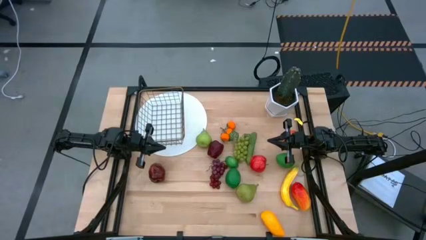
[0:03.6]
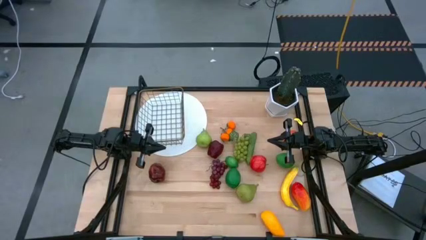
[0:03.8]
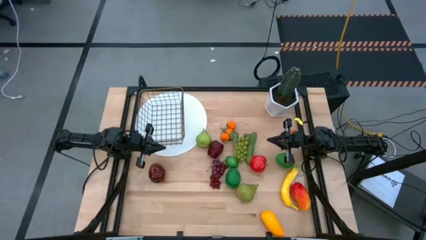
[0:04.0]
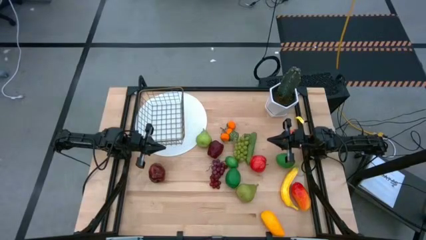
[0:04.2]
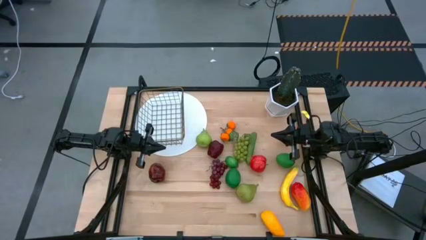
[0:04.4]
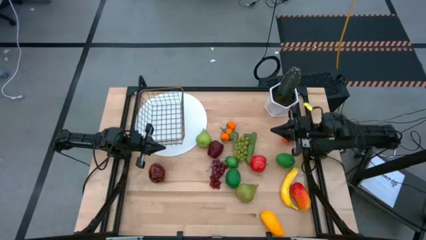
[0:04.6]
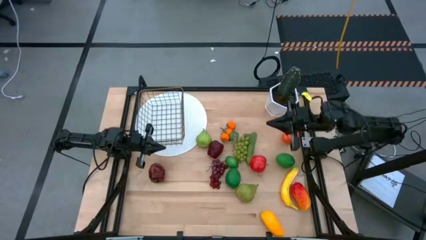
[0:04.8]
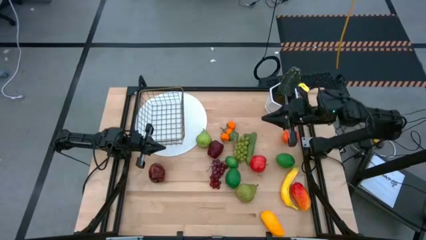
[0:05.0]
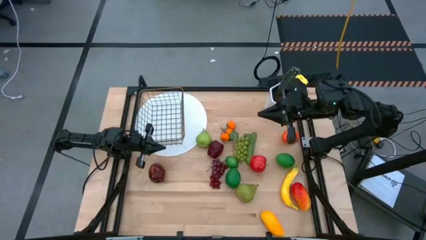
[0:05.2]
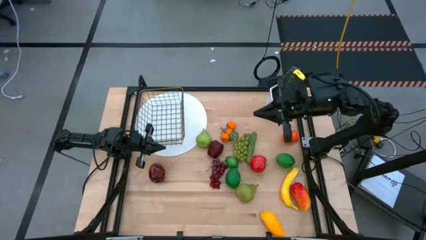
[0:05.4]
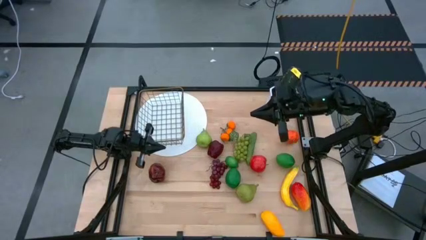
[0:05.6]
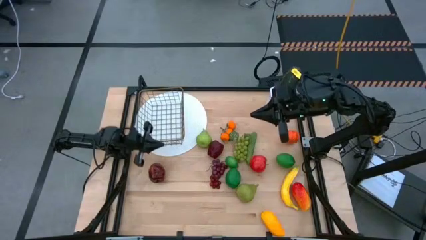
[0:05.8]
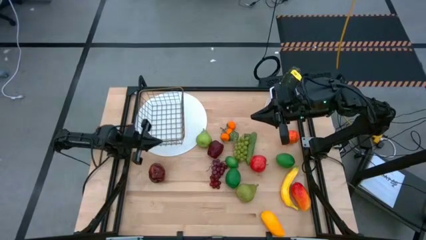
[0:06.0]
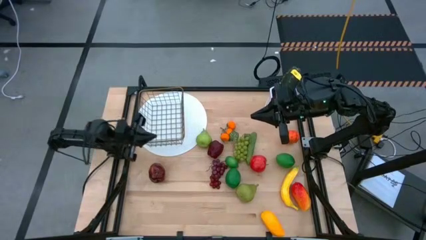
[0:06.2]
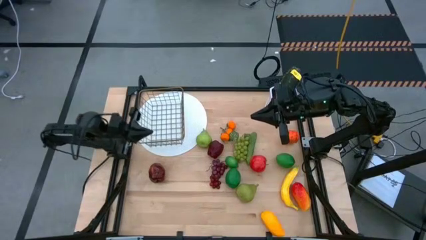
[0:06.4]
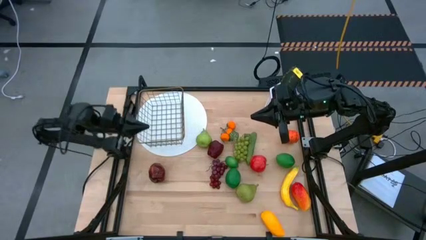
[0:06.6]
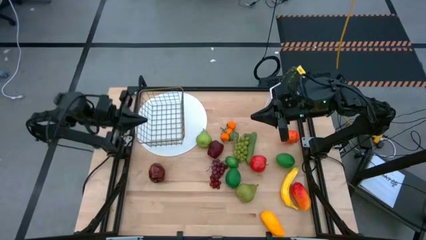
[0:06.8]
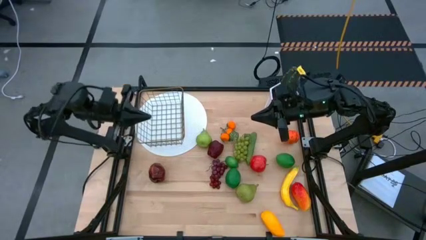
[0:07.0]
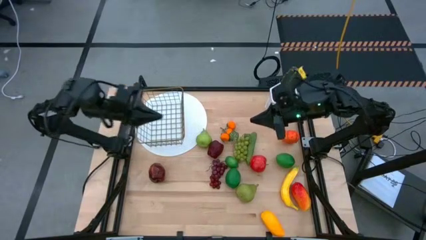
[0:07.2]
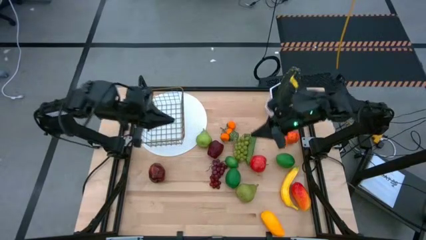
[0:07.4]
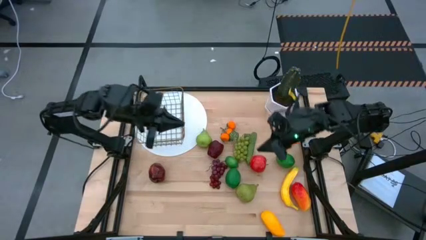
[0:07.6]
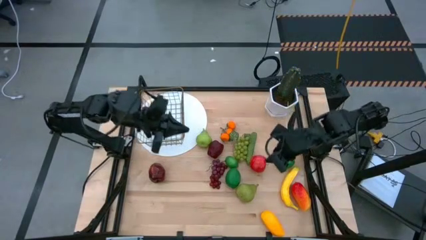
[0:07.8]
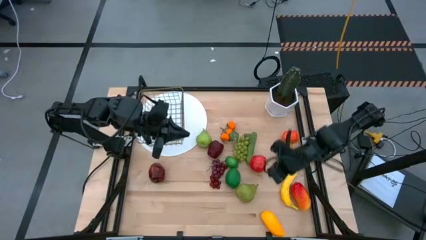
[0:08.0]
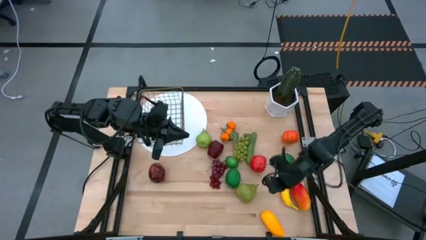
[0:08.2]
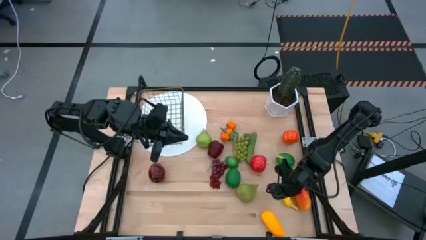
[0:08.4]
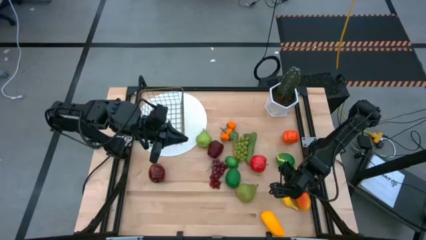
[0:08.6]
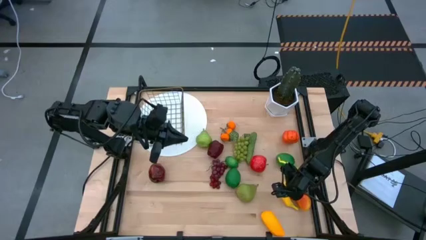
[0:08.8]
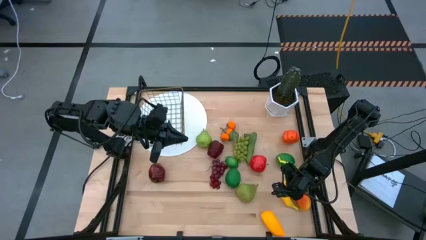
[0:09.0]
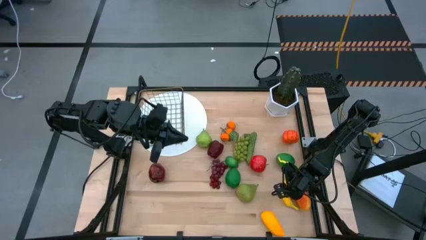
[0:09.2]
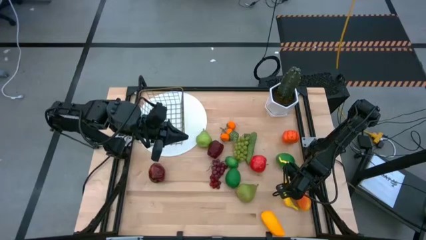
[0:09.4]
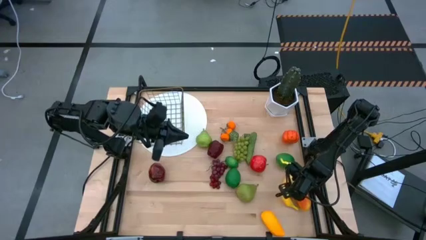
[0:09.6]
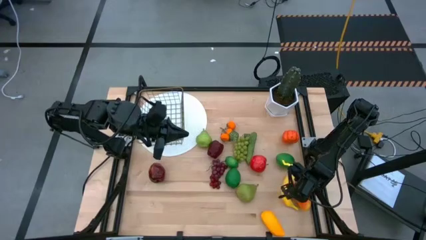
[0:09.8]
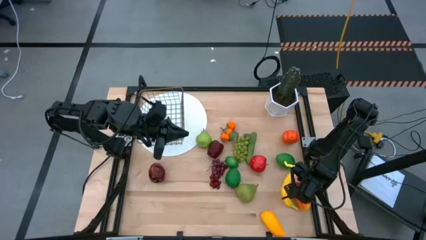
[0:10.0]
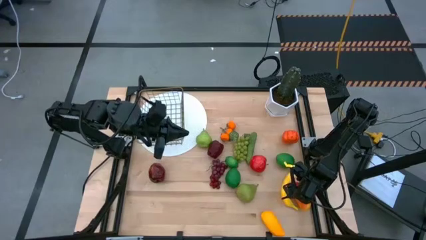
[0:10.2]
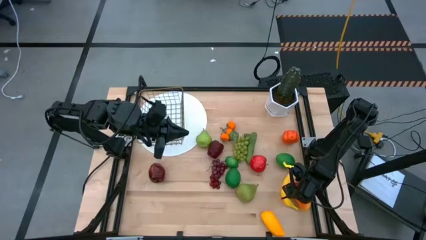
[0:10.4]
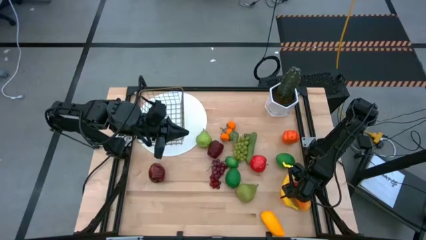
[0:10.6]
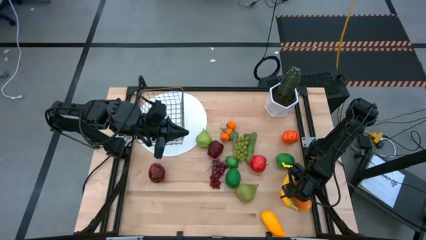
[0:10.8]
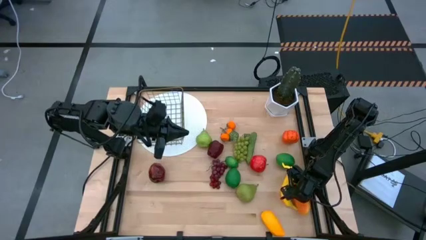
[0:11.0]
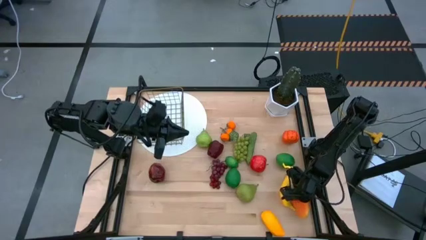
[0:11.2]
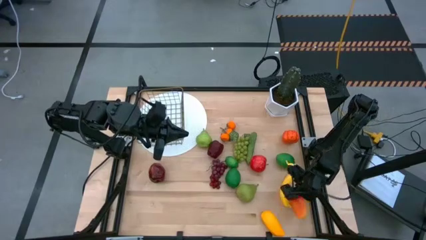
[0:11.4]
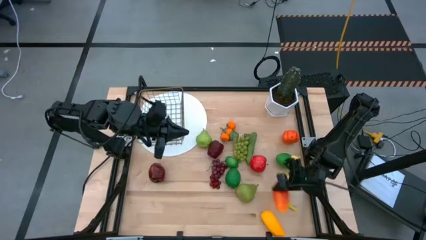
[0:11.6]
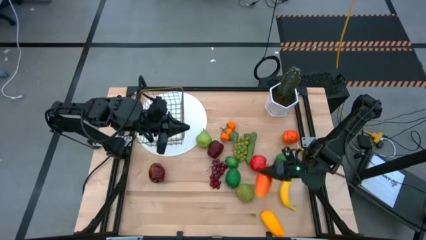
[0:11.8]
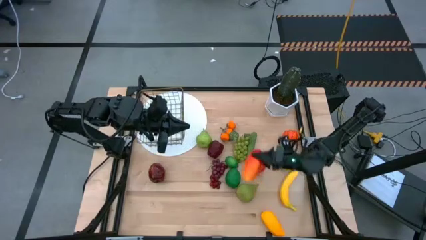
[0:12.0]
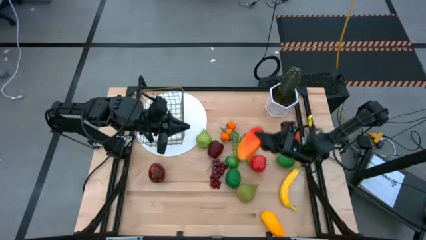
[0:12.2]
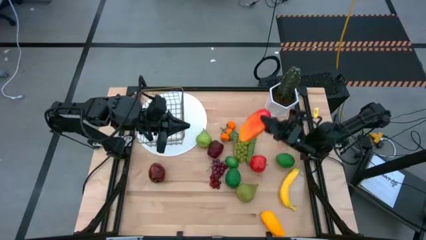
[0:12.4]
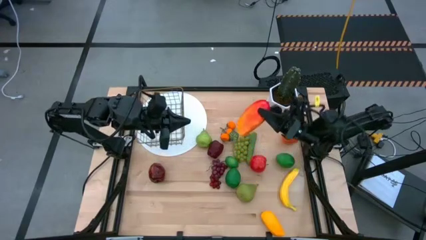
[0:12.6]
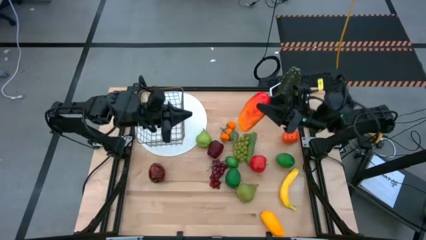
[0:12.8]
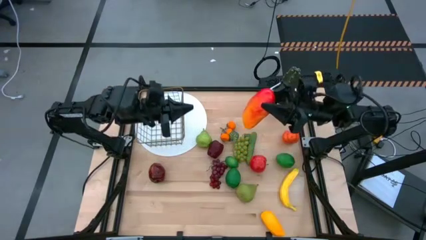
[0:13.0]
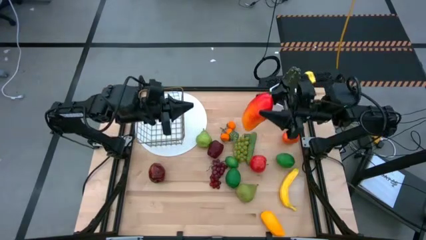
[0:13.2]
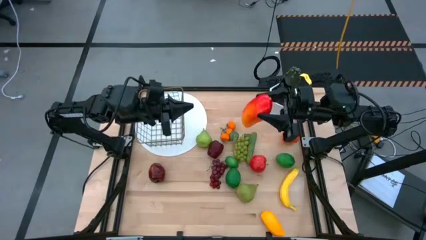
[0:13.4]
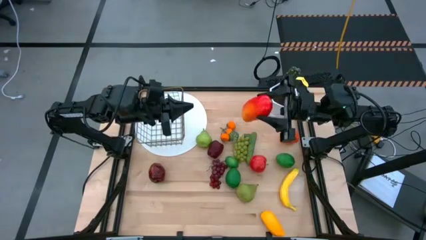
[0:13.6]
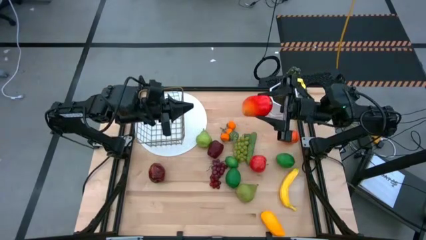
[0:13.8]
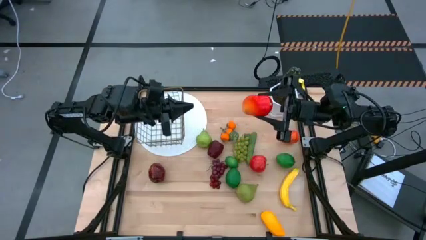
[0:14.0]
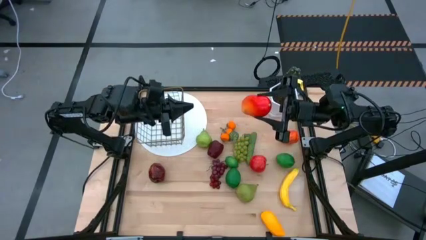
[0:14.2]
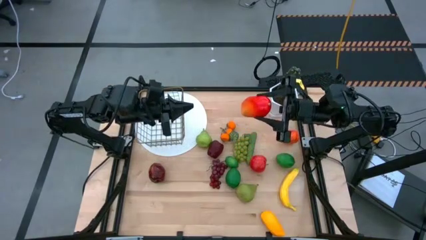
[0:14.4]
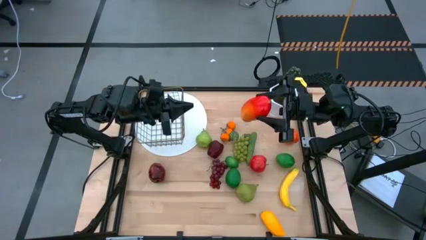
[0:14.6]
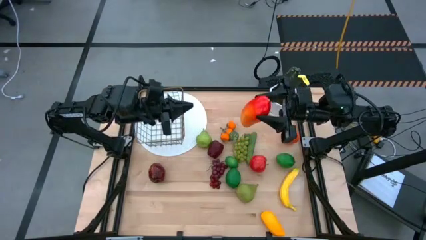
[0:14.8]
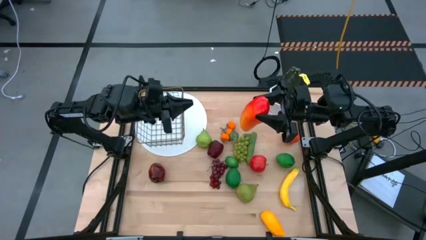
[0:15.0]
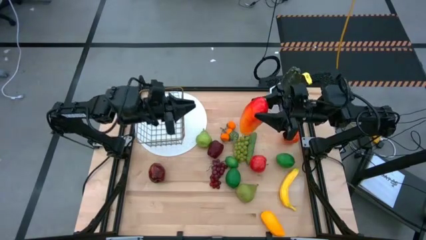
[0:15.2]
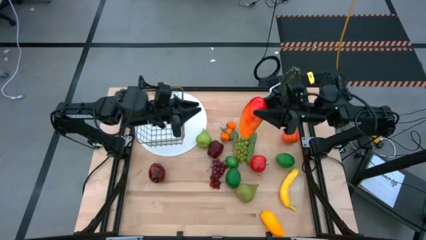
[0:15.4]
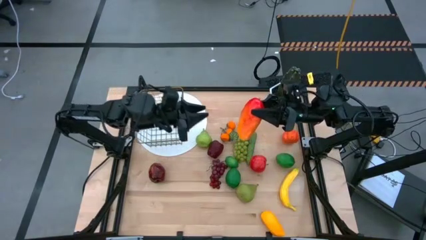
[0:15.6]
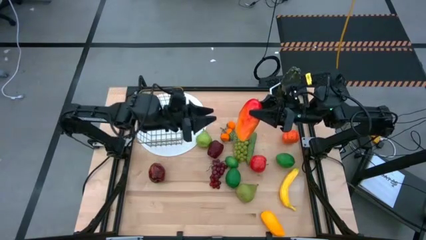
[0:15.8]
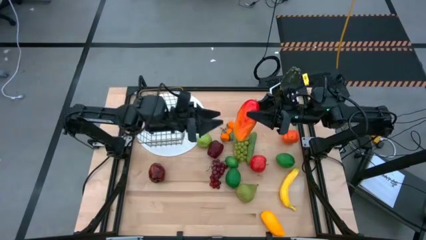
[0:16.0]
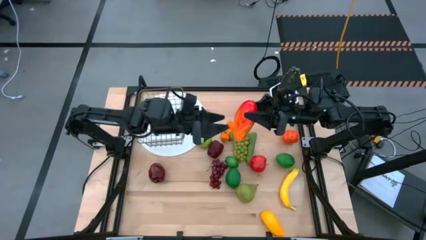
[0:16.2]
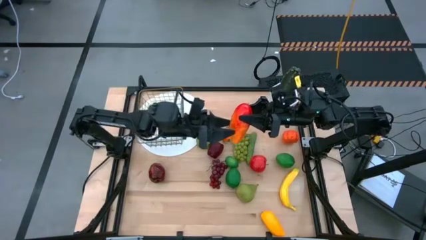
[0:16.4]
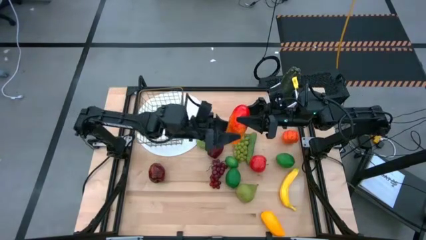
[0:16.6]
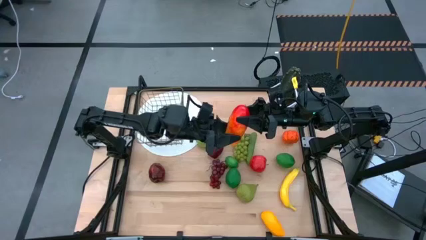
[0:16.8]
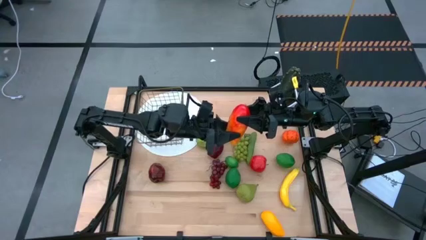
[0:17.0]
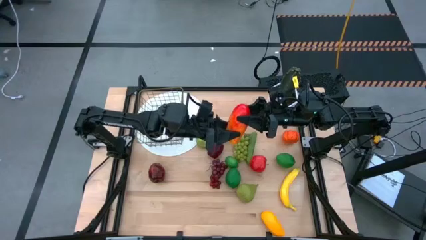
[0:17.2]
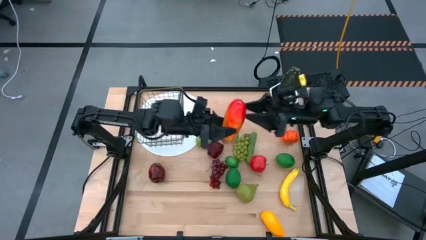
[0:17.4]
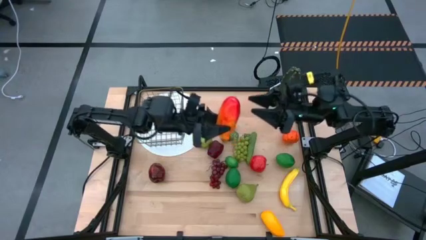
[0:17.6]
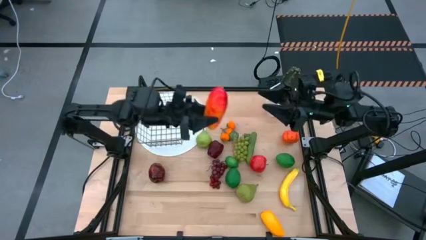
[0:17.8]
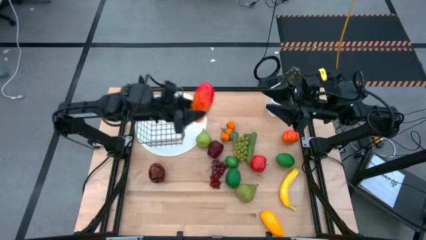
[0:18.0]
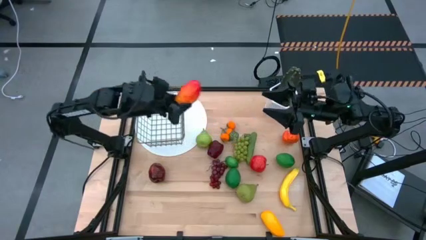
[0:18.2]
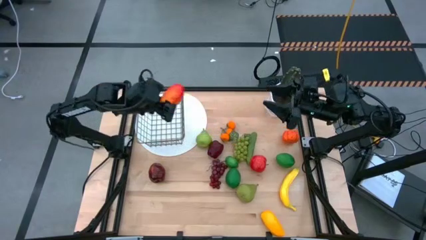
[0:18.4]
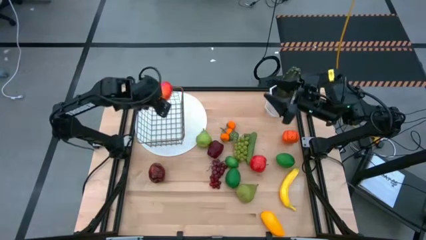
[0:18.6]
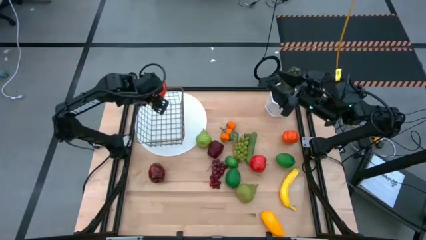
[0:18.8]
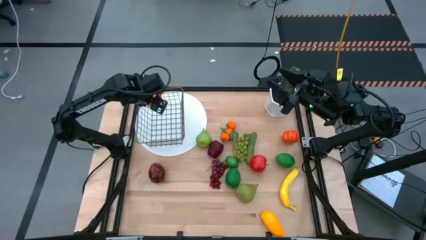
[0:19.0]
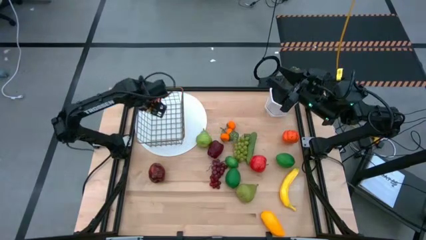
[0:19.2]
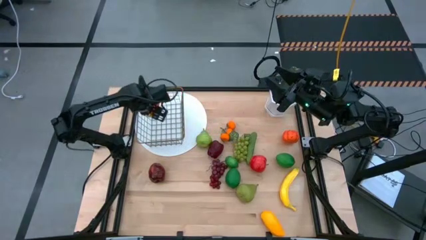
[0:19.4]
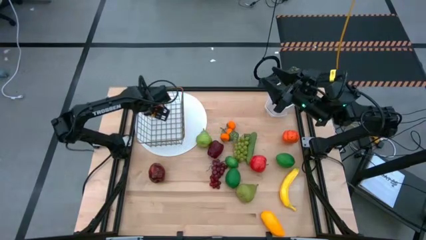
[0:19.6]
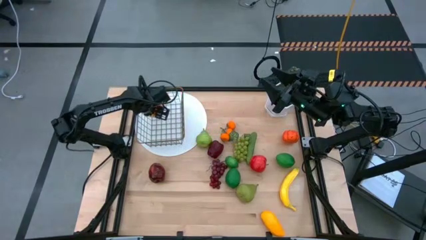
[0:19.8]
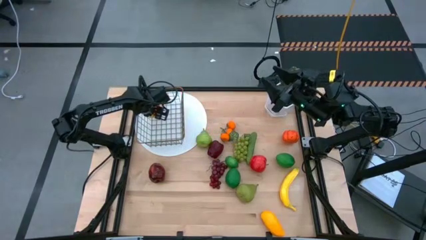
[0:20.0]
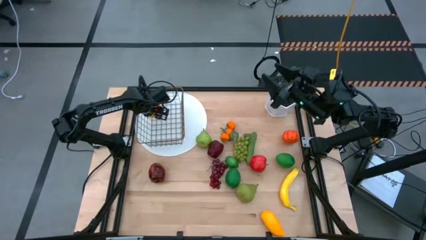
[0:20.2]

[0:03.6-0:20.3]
Task: Build produce basket
Put the red mango into the wire basket
